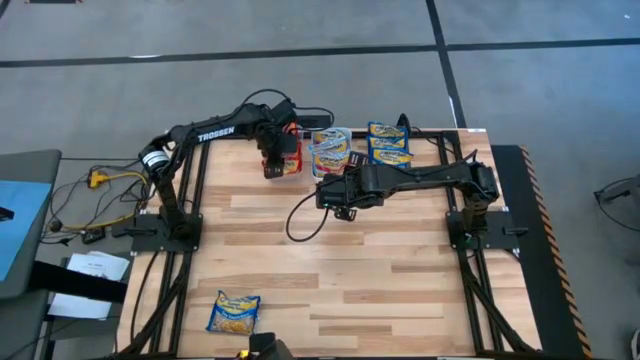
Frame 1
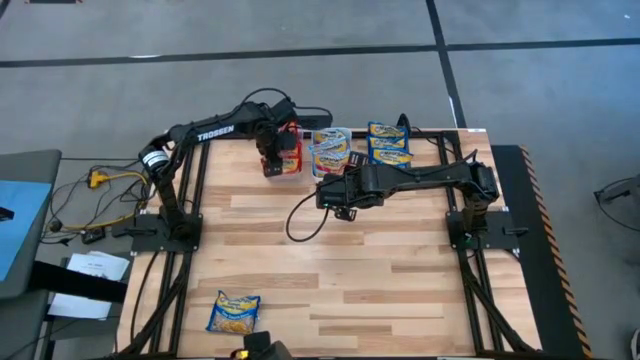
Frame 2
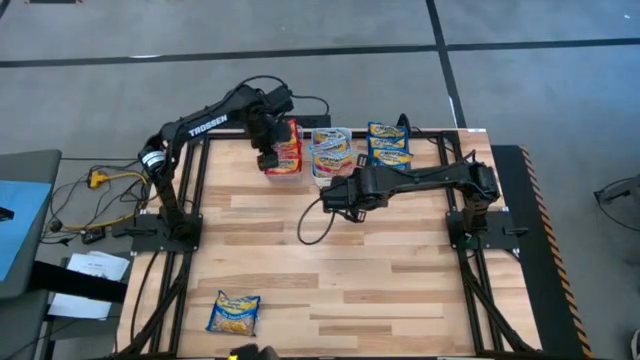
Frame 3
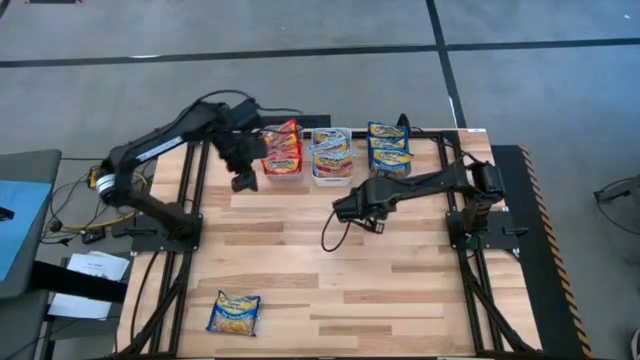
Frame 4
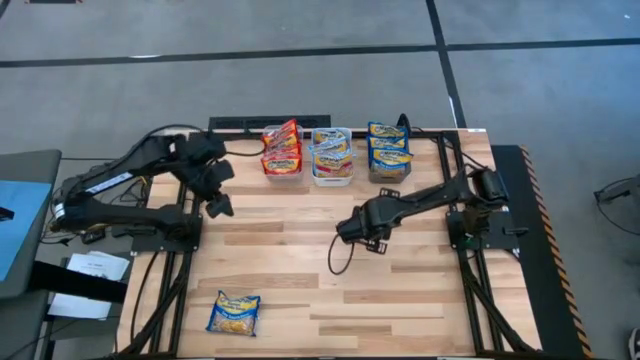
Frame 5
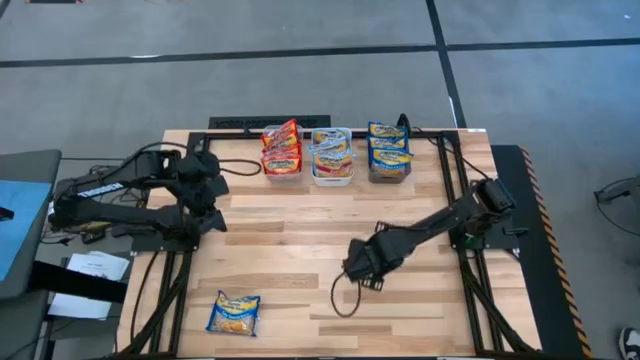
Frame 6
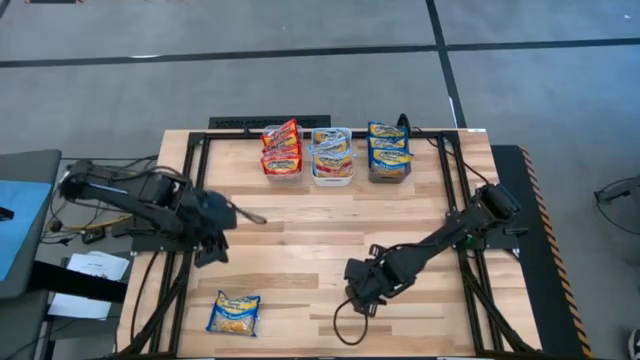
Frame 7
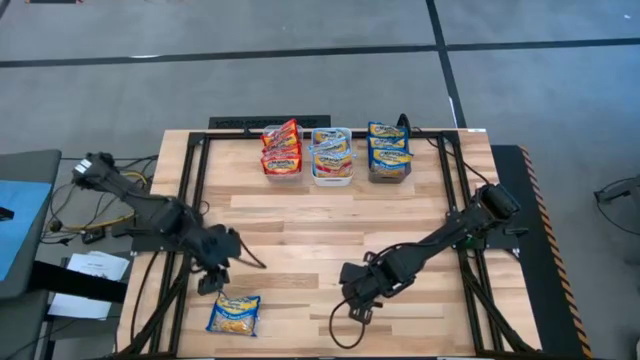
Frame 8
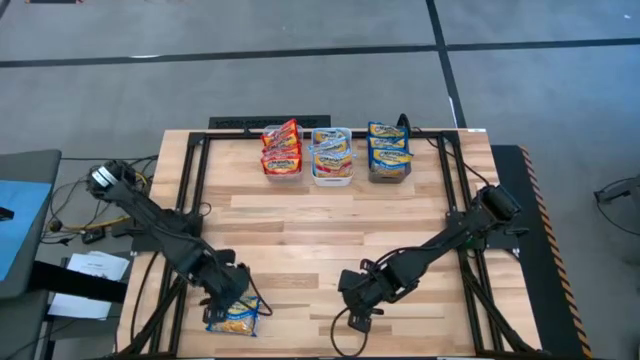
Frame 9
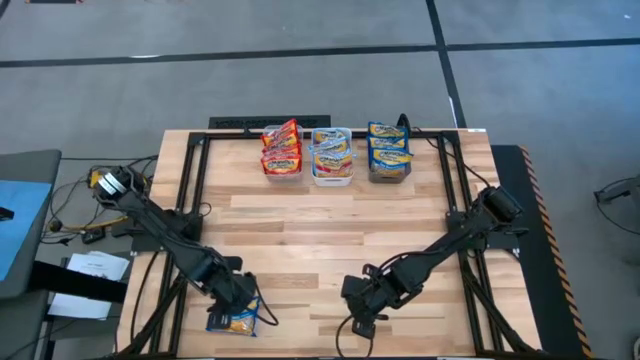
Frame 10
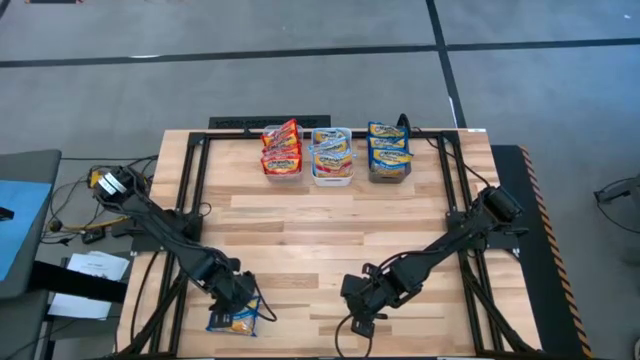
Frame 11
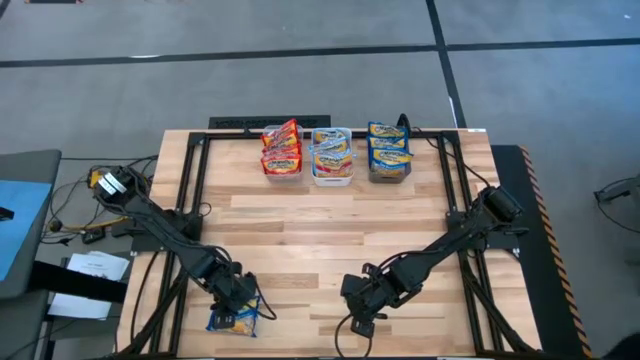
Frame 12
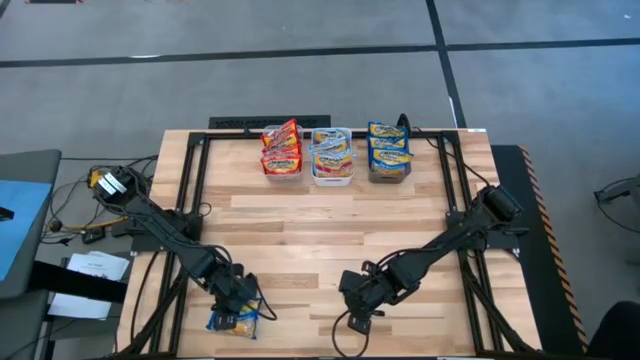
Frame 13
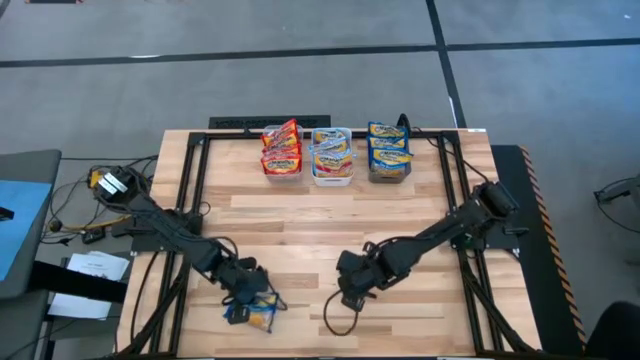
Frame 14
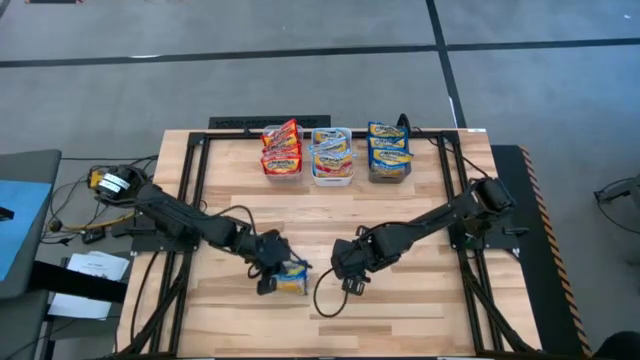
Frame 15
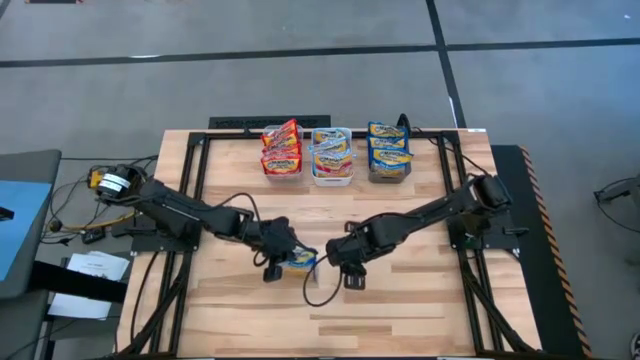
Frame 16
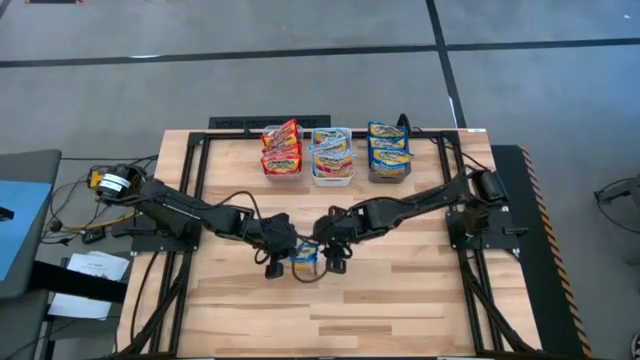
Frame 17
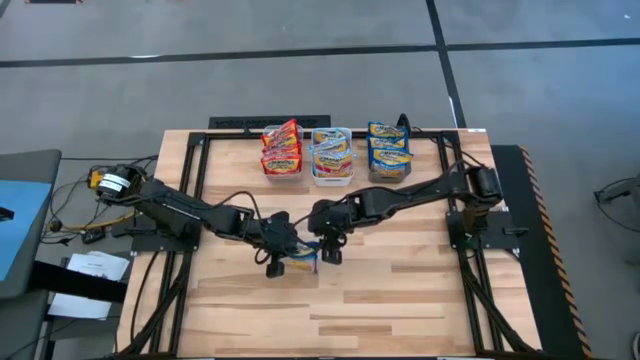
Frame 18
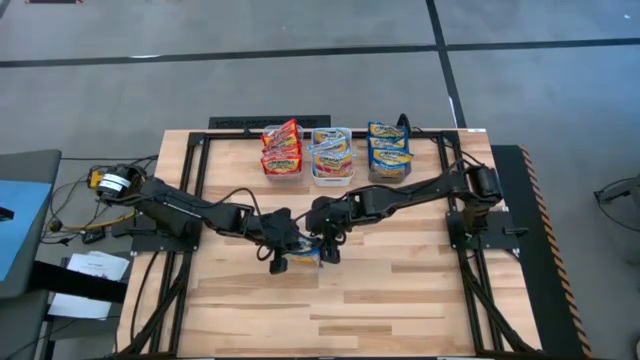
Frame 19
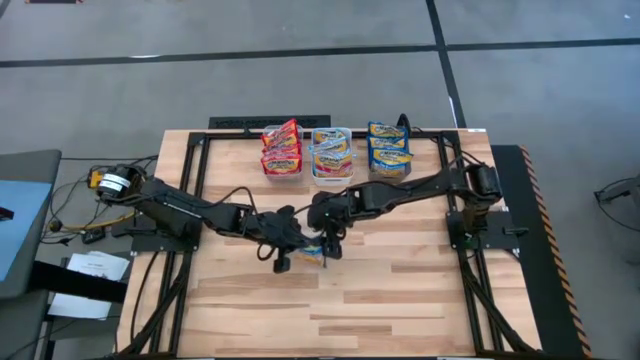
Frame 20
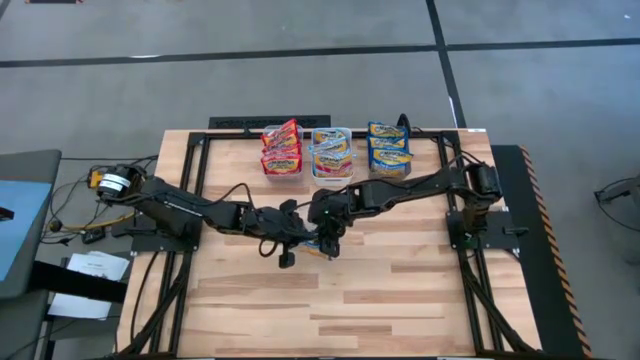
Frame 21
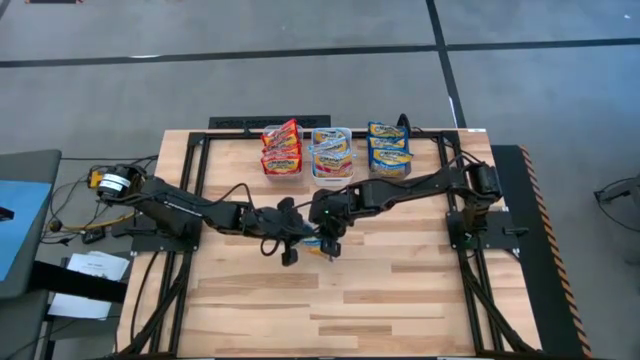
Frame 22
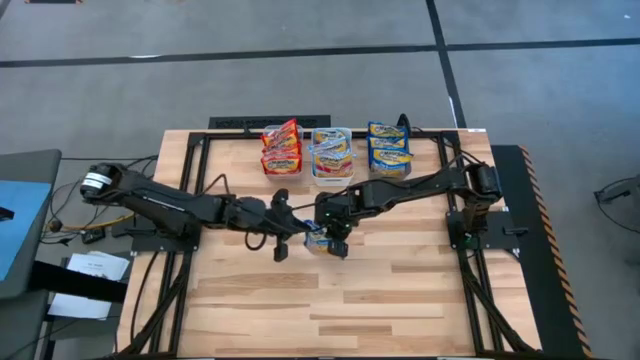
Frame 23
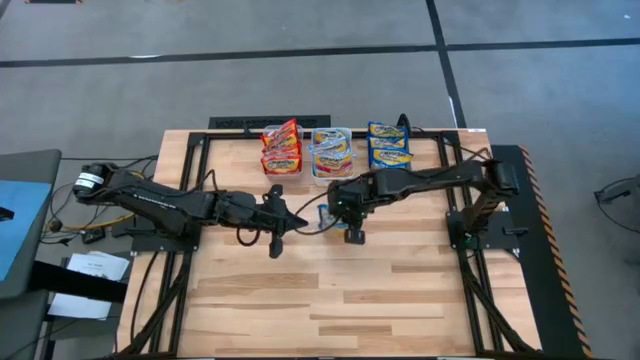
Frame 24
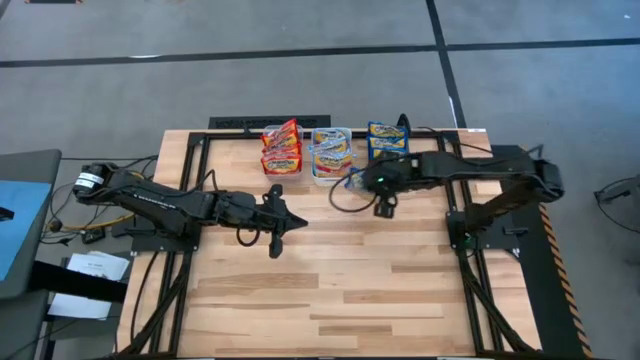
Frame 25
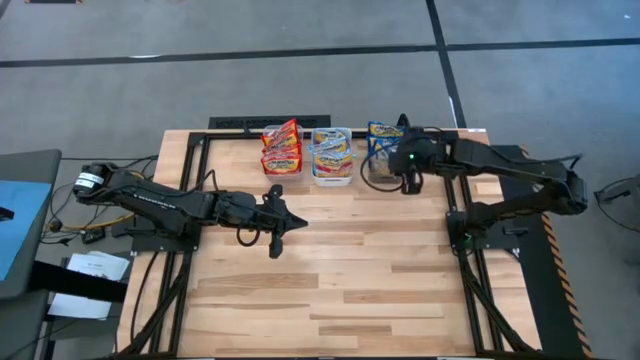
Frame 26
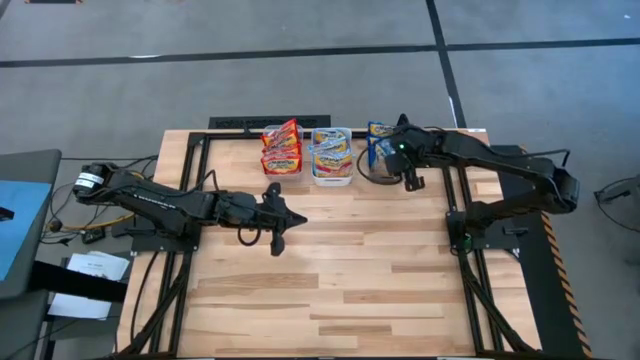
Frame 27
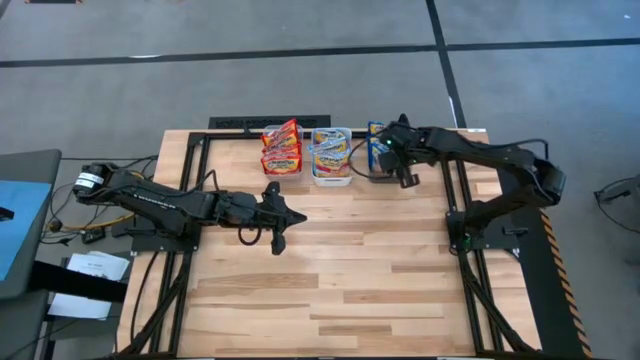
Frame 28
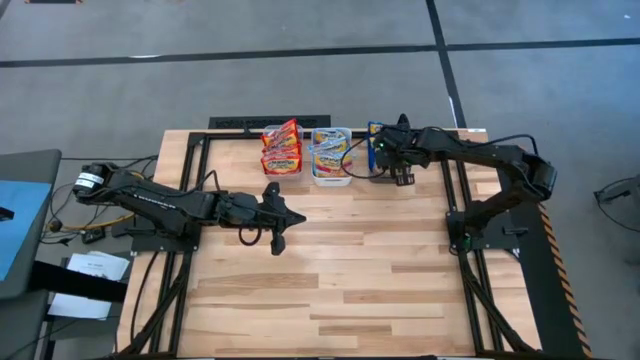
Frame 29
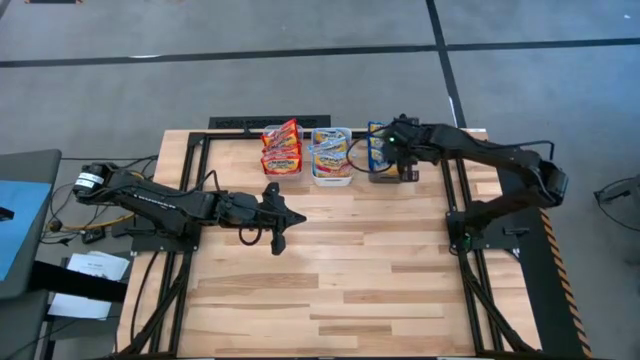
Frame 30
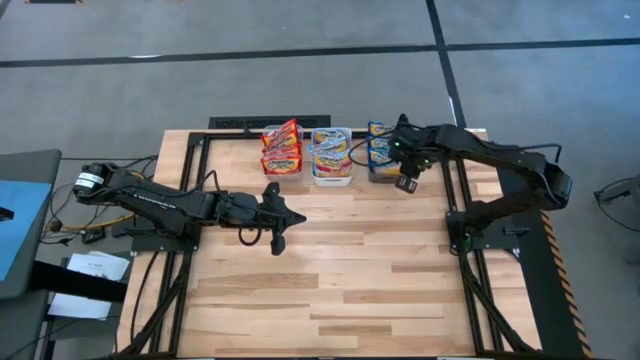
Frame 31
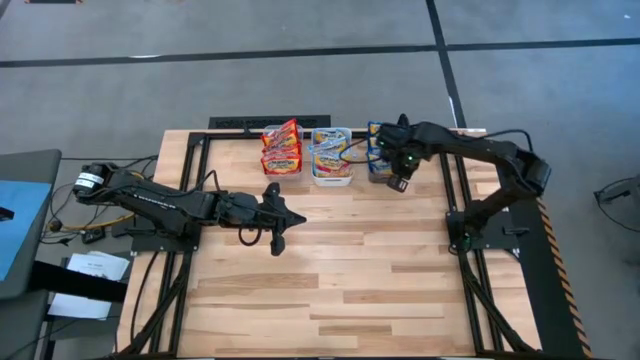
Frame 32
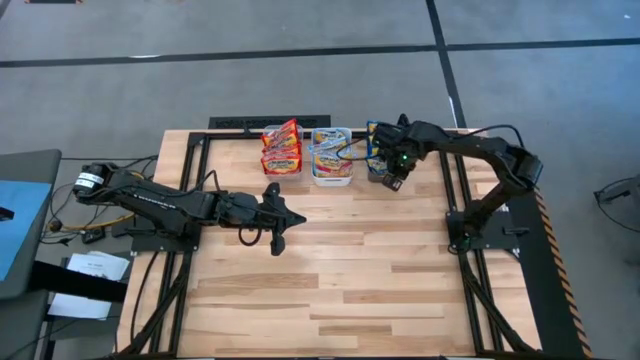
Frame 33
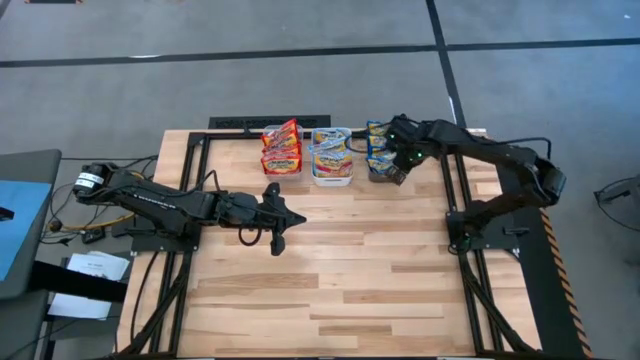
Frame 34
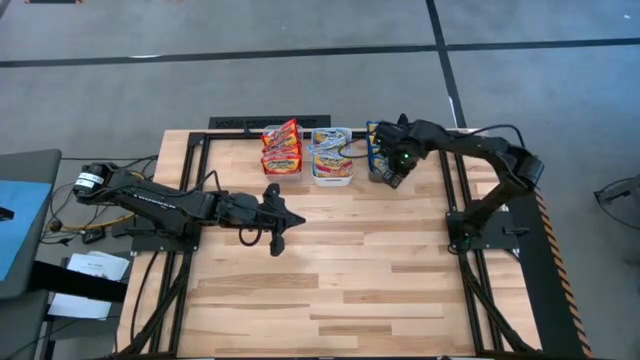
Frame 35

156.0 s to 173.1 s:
Task: Sort Maruchan noodles
Put the blue noodle pack into the black bin

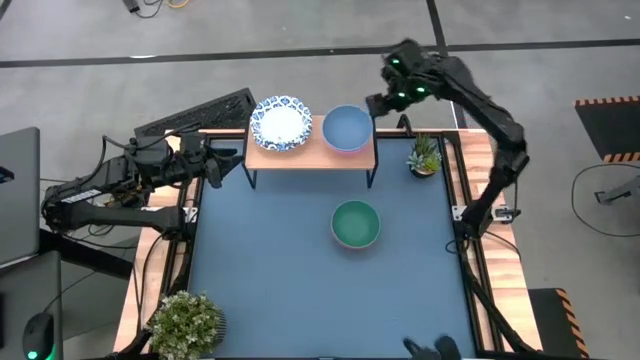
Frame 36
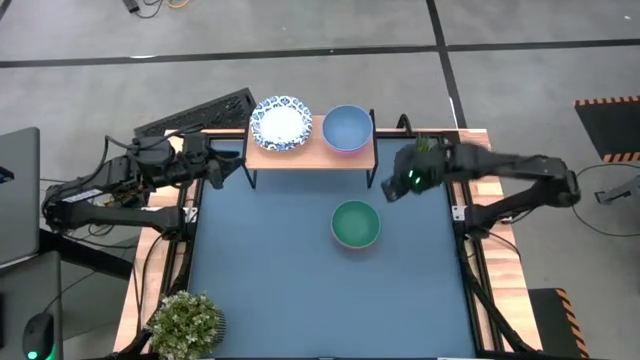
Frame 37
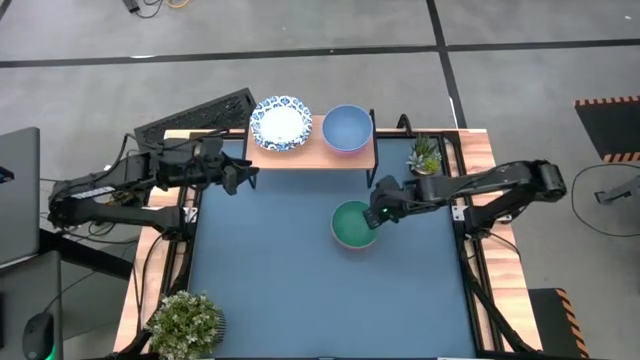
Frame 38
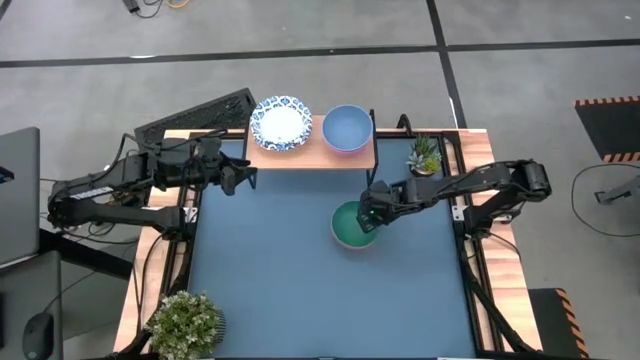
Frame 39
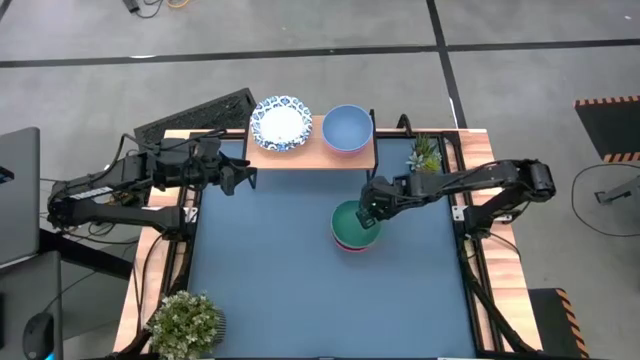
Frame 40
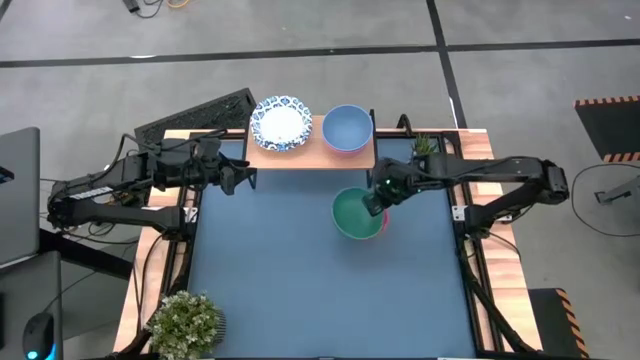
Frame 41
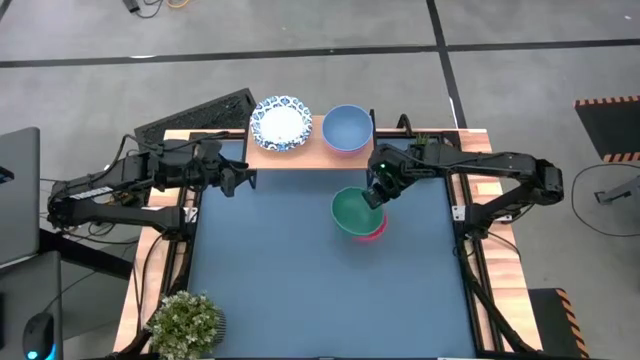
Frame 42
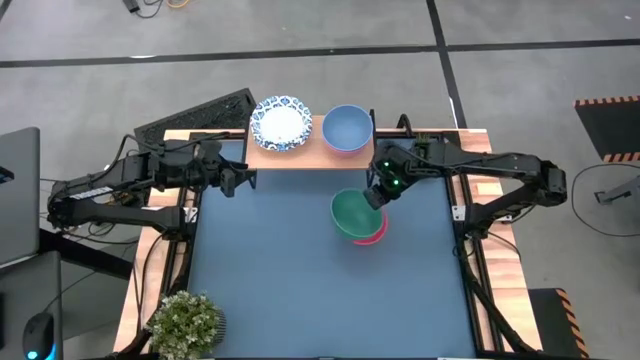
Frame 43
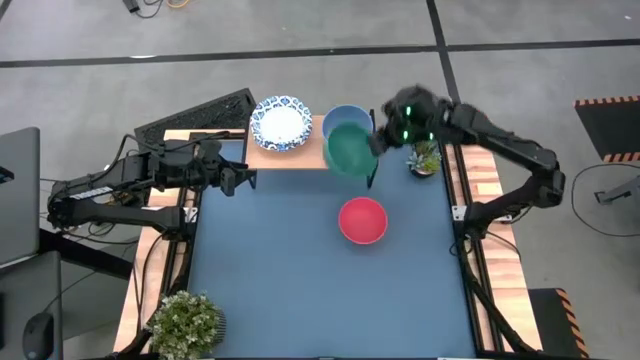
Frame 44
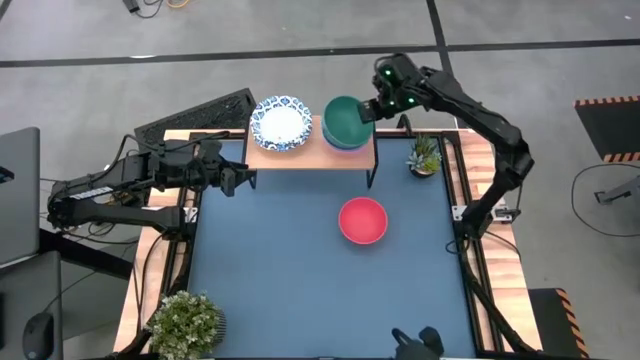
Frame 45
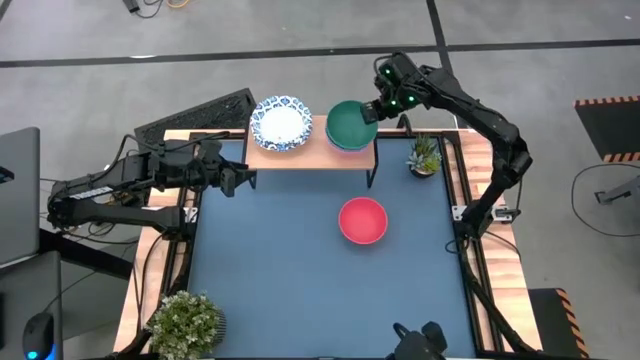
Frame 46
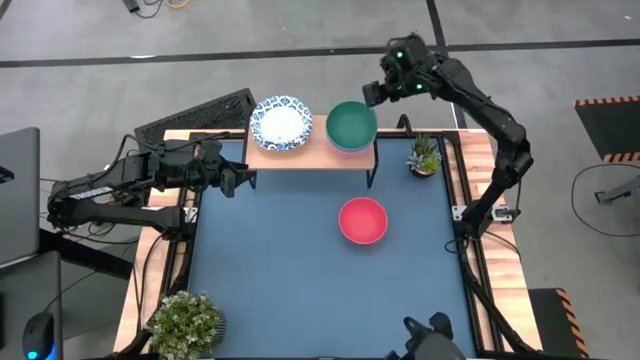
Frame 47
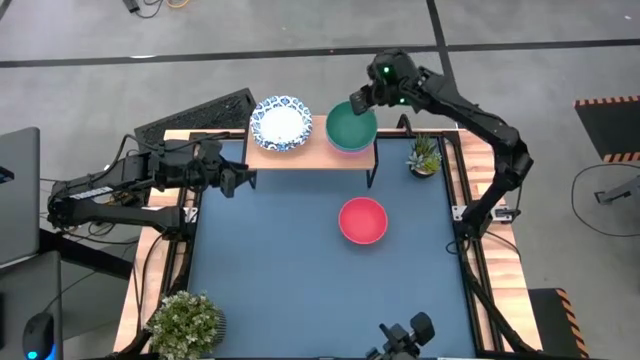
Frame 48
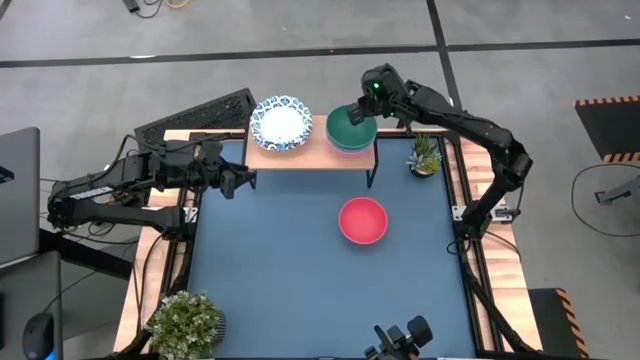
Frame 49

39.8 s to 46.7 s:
Task: Place and stack bowls onto a shelf
Stack the green bowl on the blue bowl on the shelf
